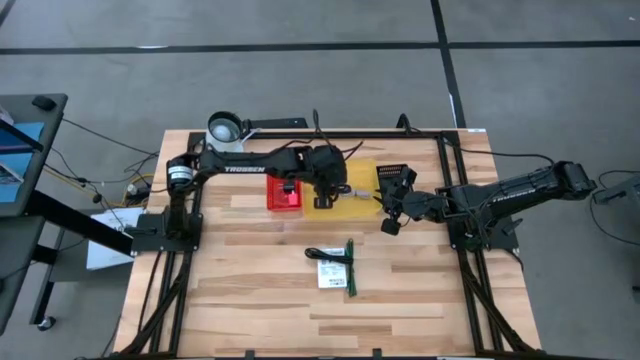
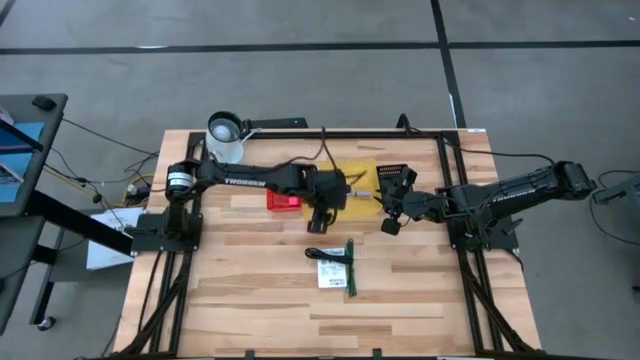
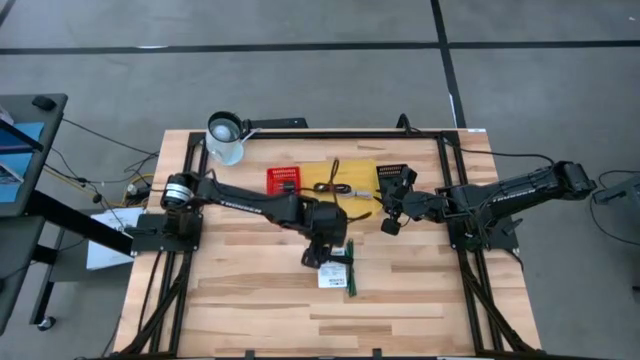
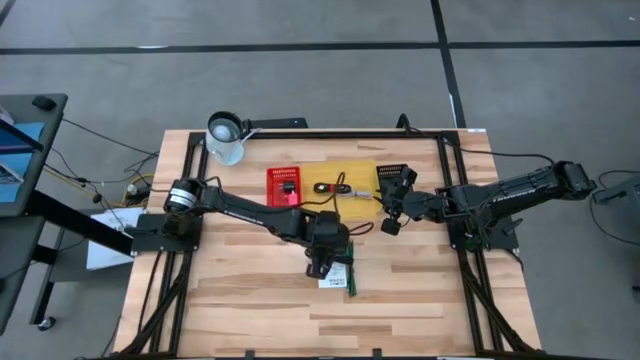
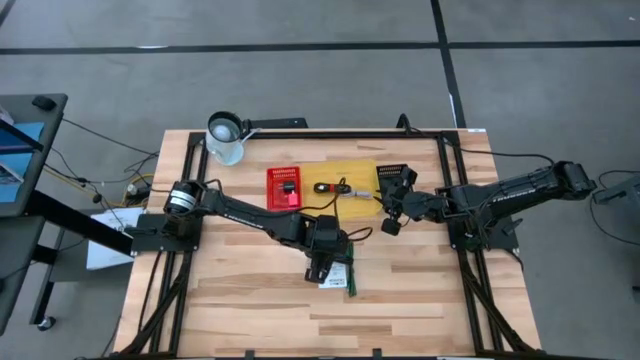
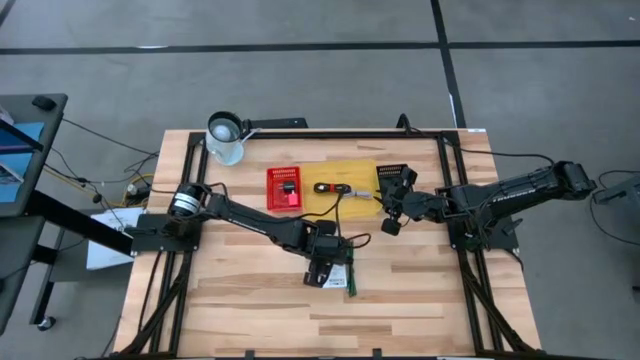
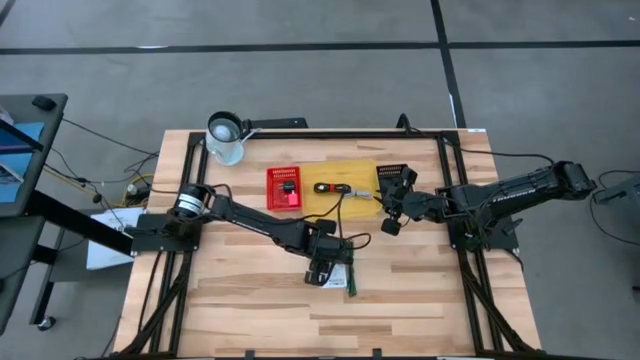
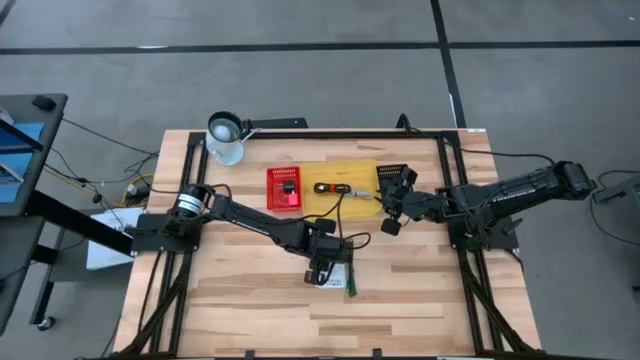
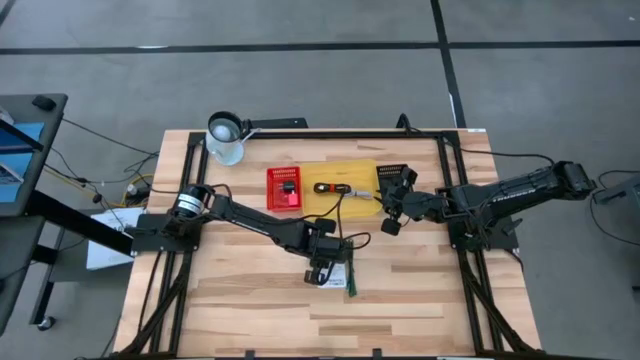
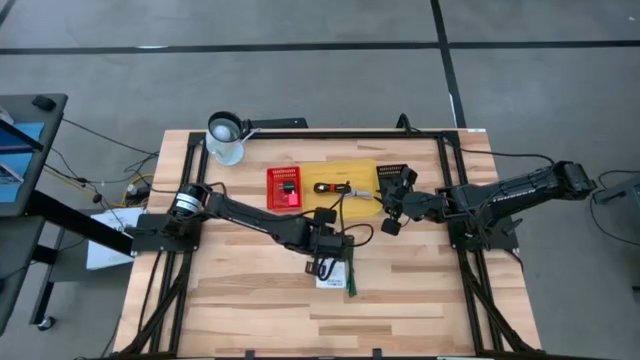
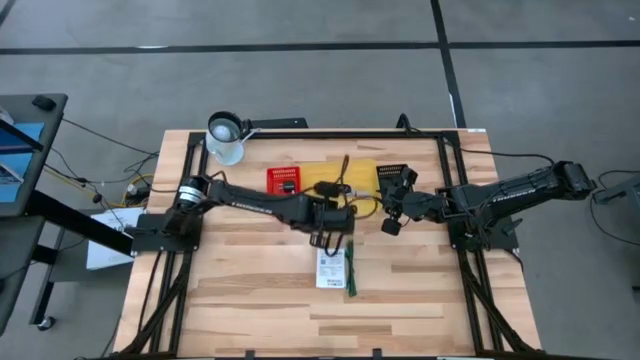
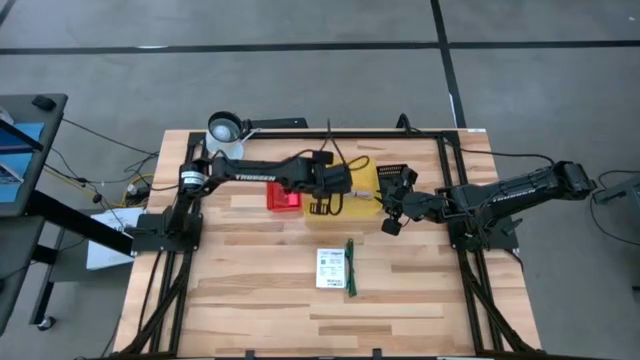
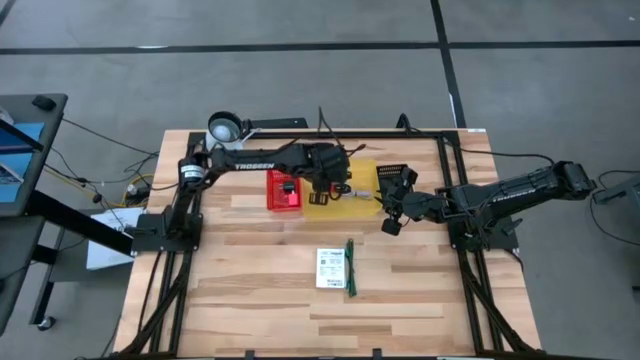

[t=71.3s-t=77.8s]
Task: Pick and place items into bin
Put the black charger cable into the yellow bin

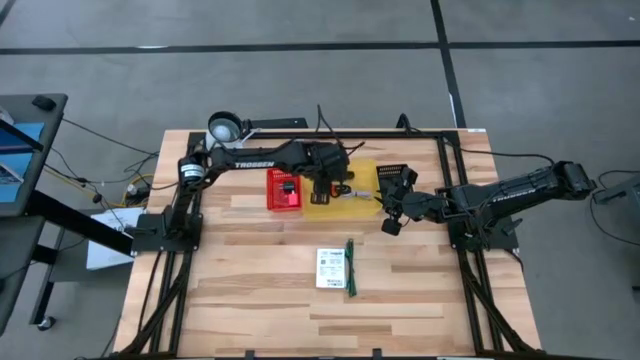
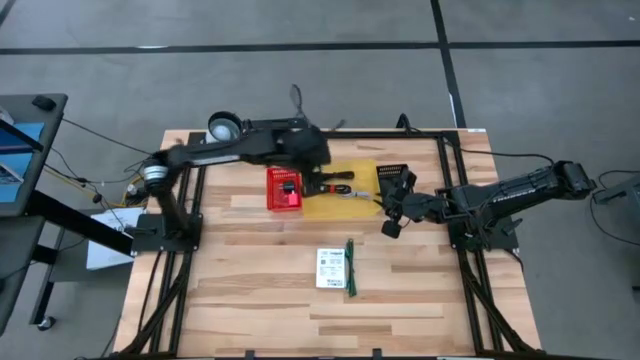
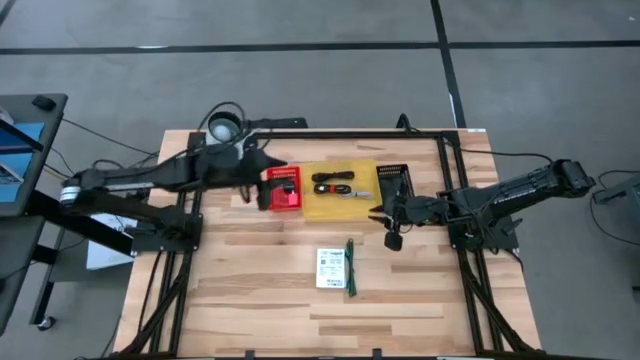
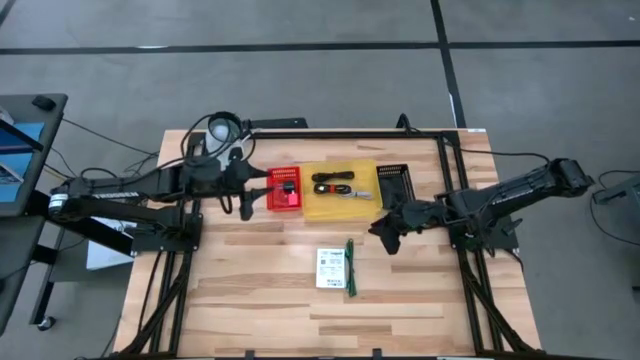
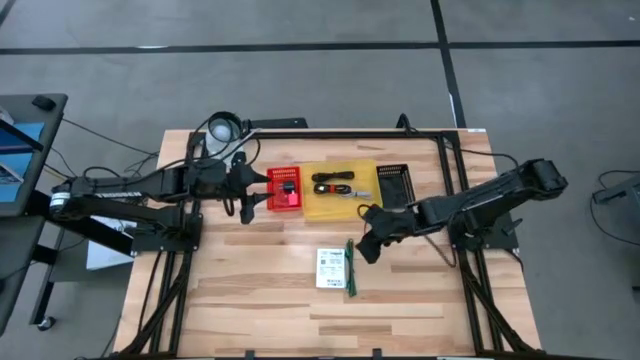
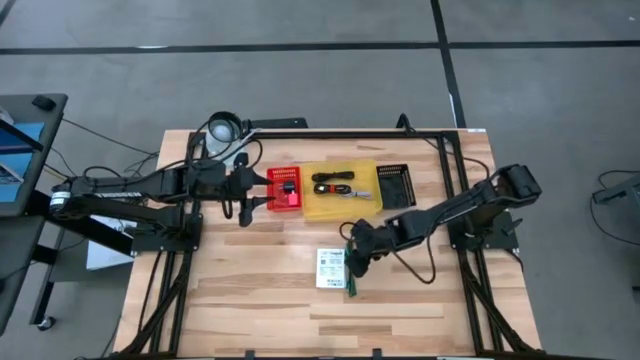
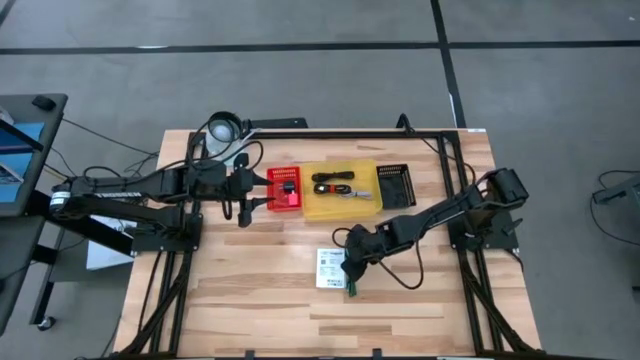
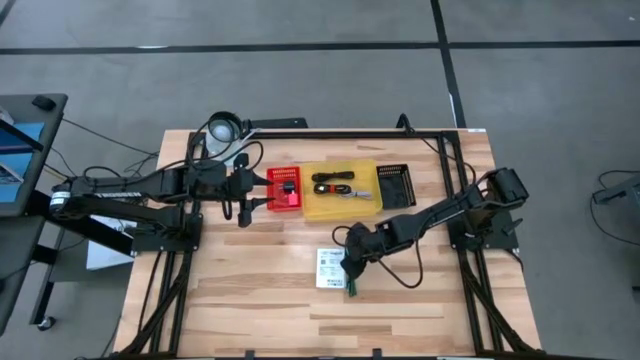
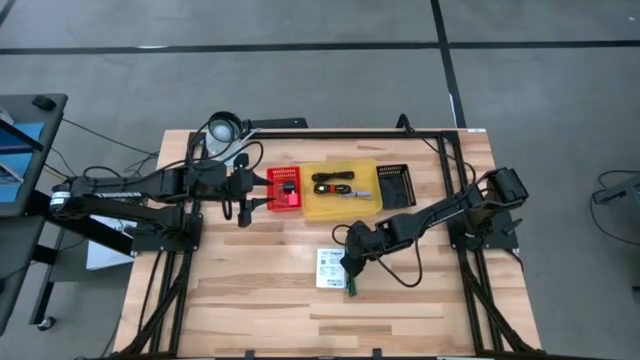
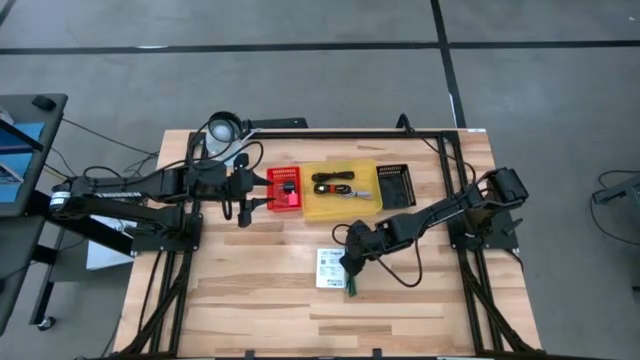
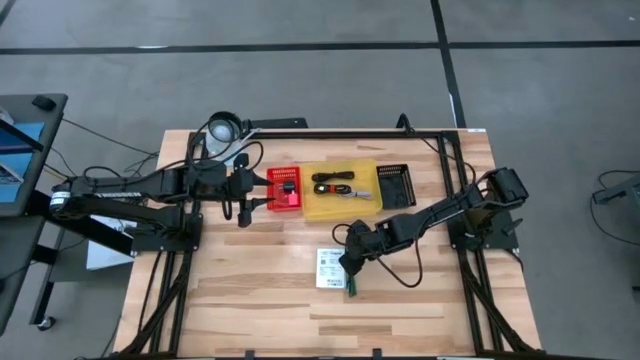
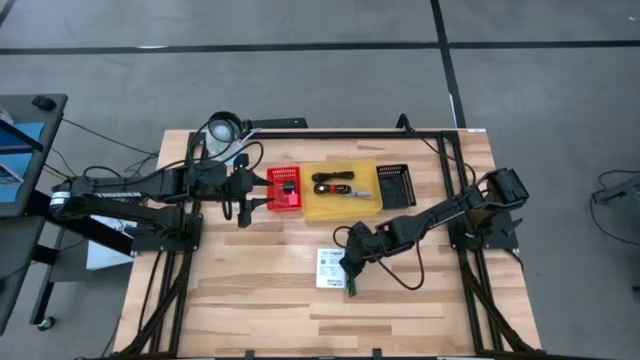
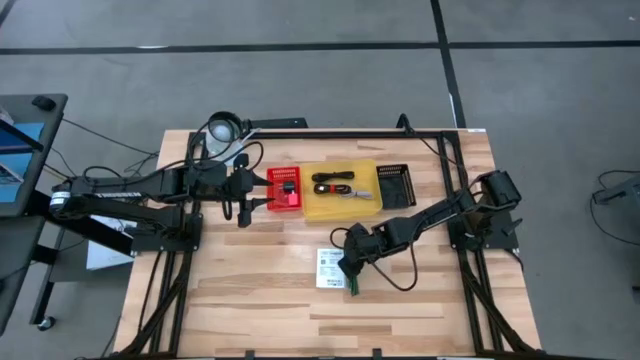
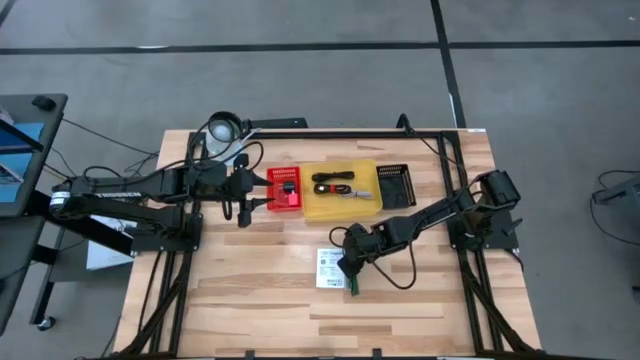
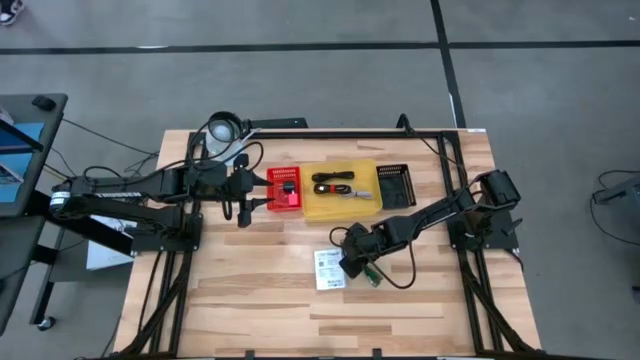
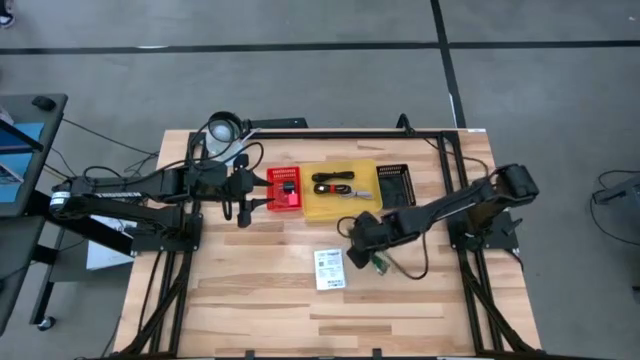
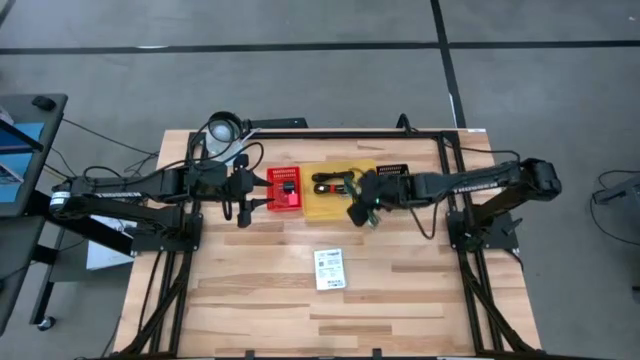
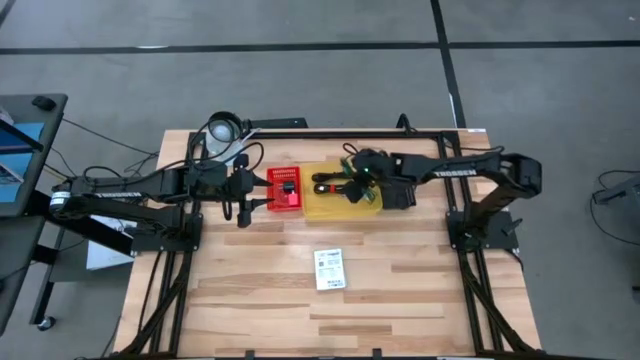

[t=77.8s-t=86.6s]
Put the green charger cable into the yellow bin

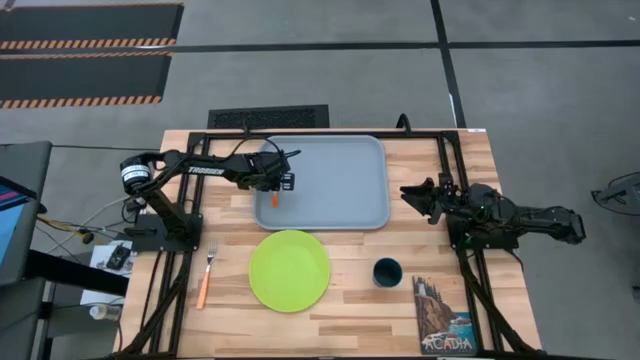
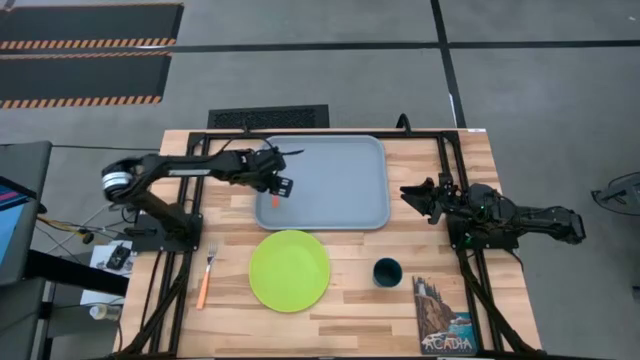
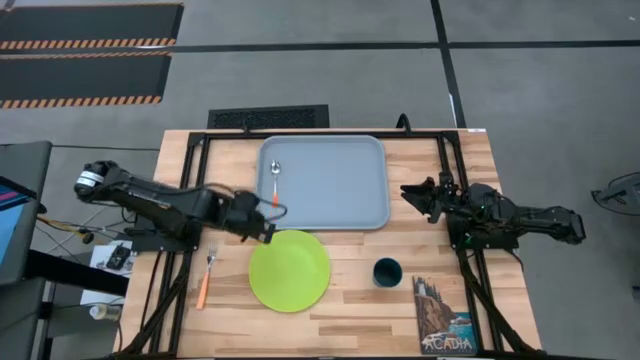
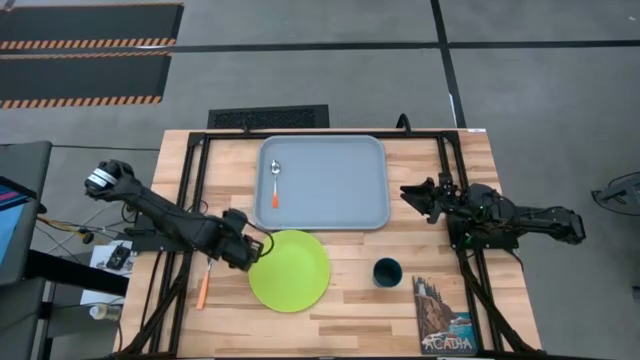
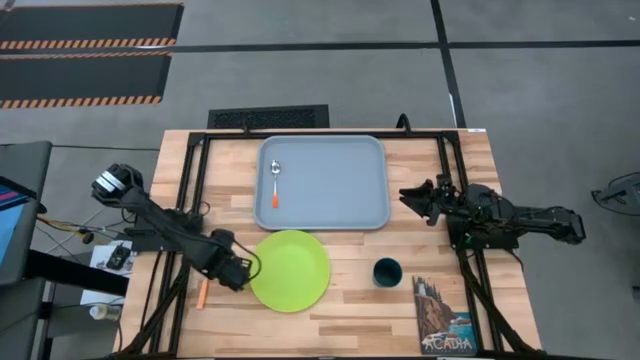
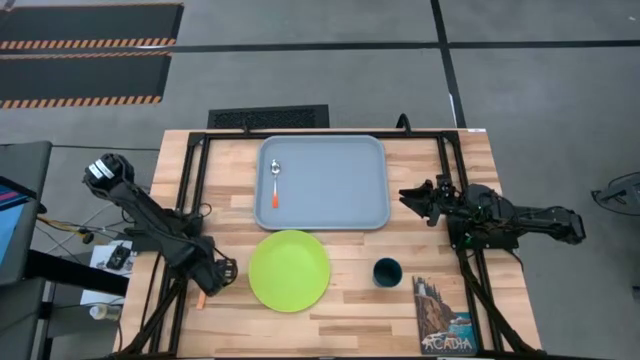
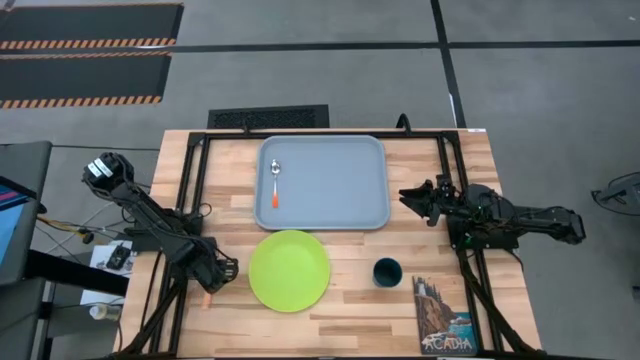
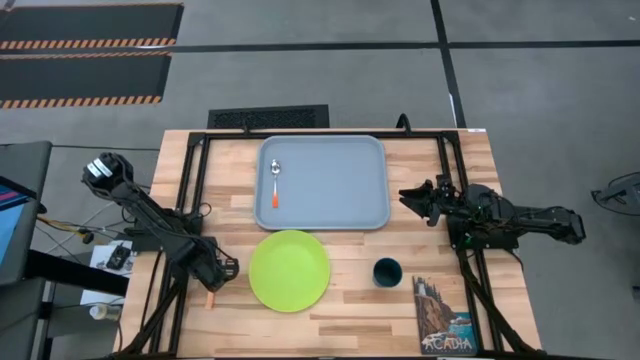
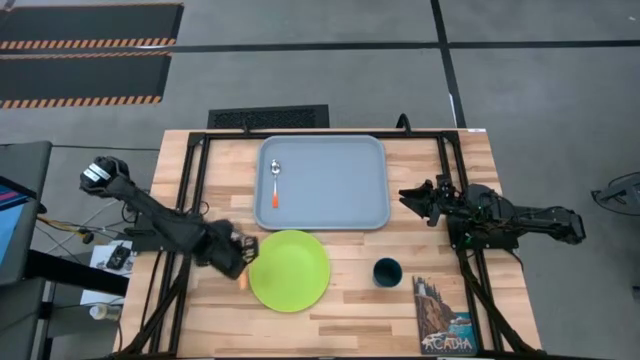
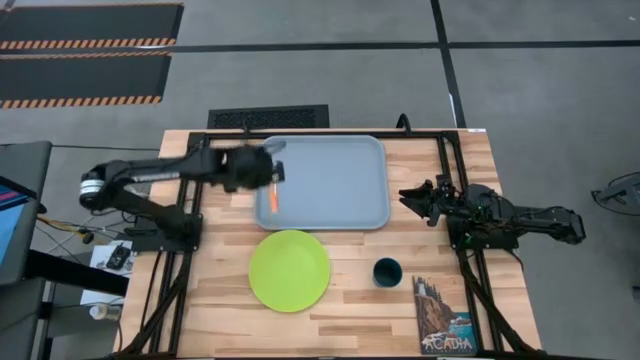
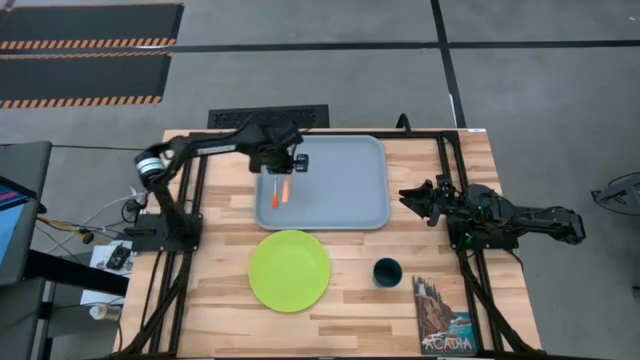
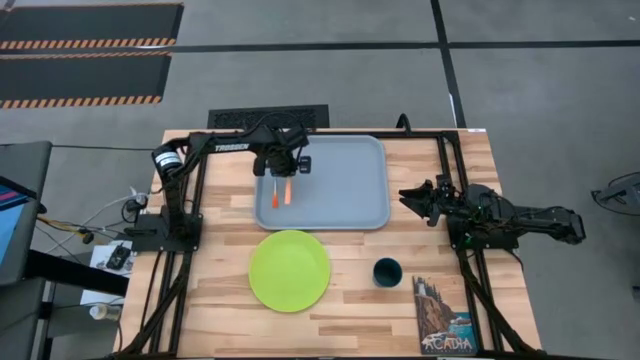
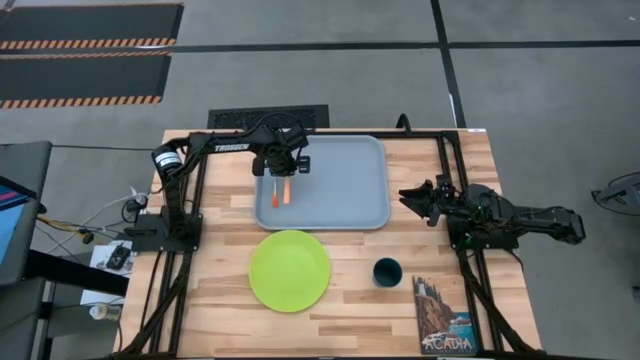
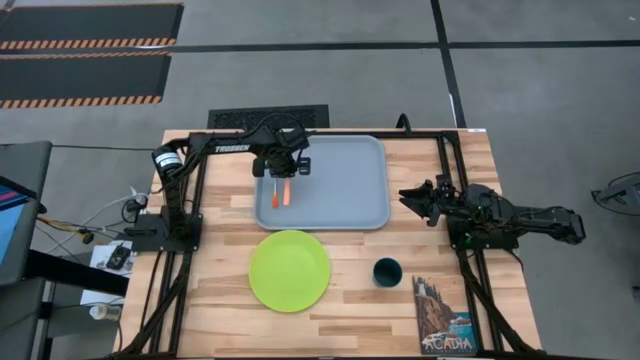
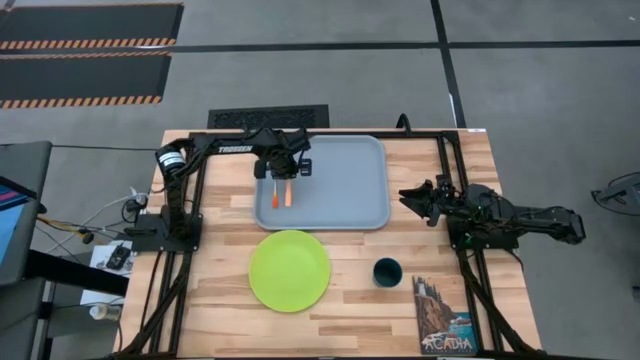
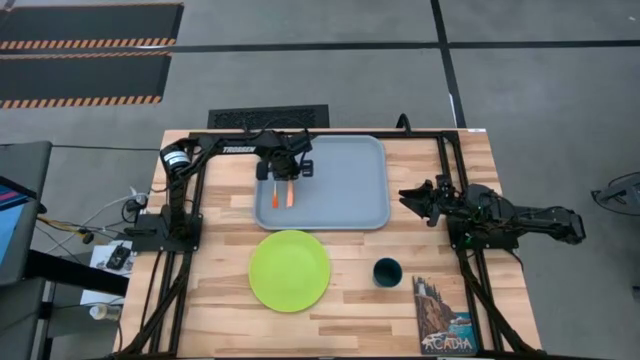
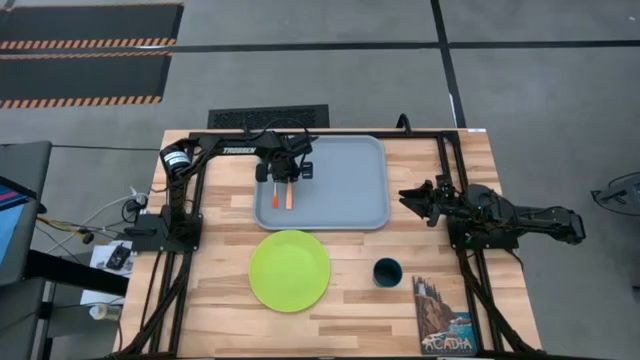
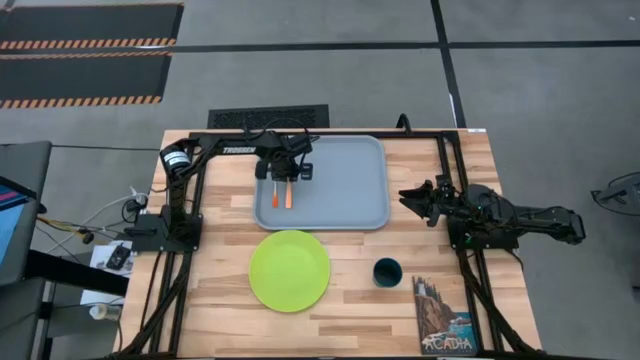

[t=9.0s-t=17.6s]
Task: Pick and place plate/cup/fork/spoon on tray
Put the orange fork on the gray tray to the right of the orange spoon
